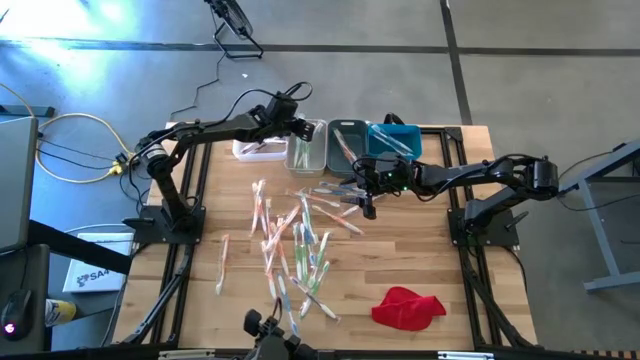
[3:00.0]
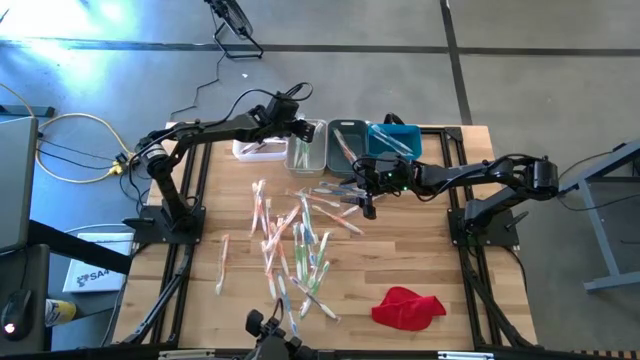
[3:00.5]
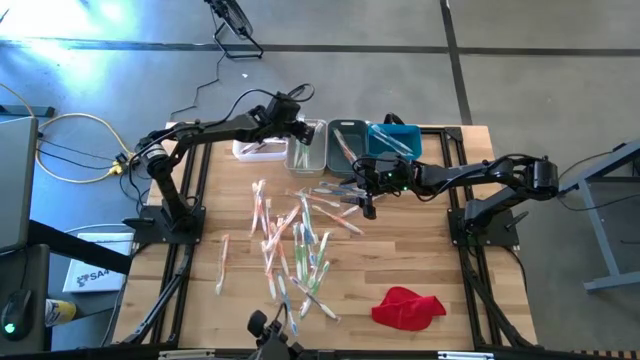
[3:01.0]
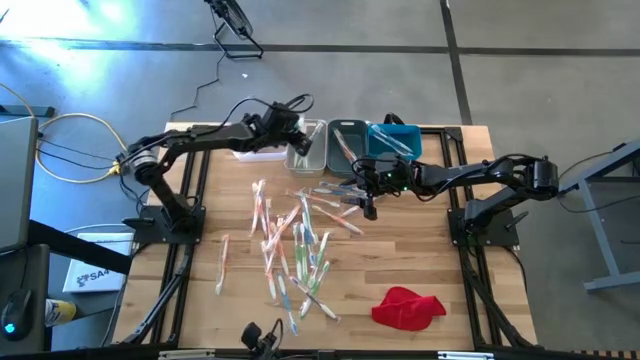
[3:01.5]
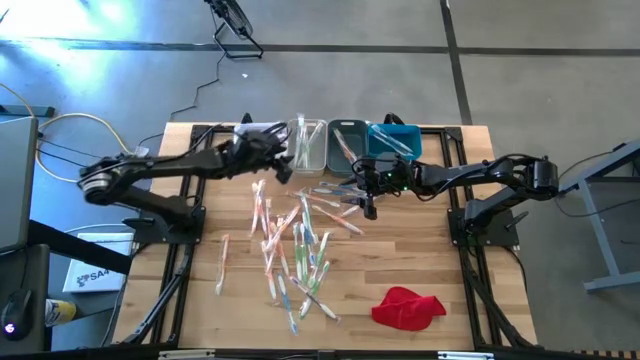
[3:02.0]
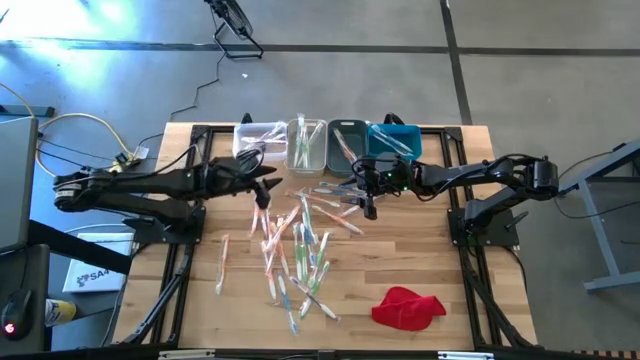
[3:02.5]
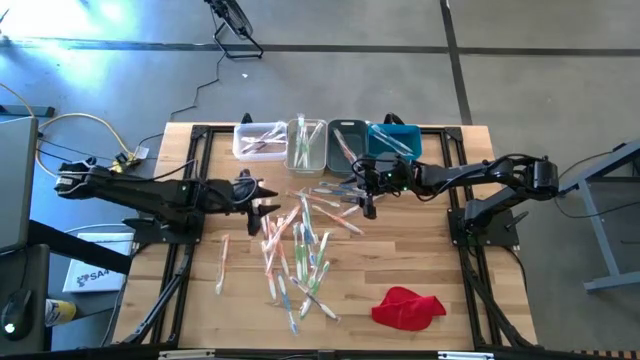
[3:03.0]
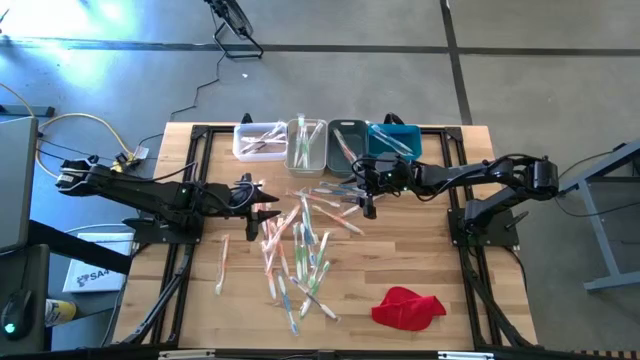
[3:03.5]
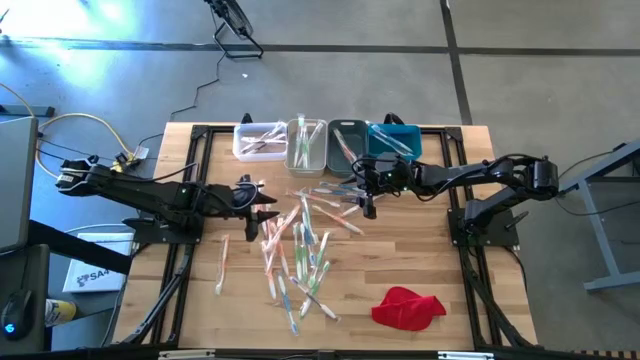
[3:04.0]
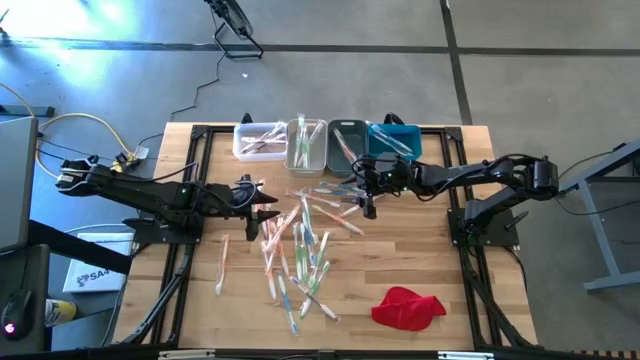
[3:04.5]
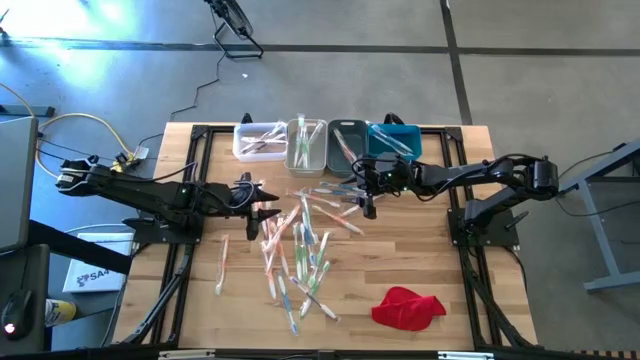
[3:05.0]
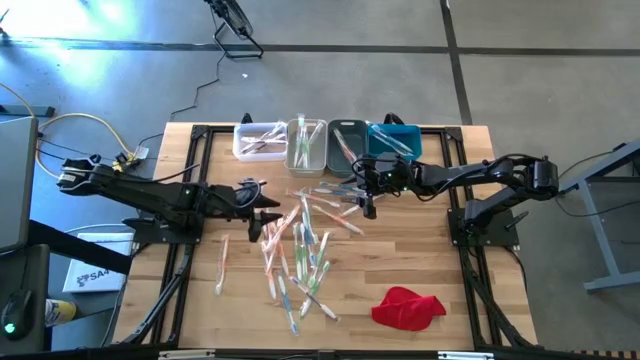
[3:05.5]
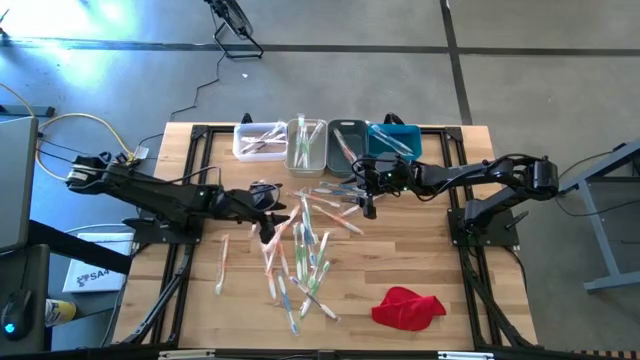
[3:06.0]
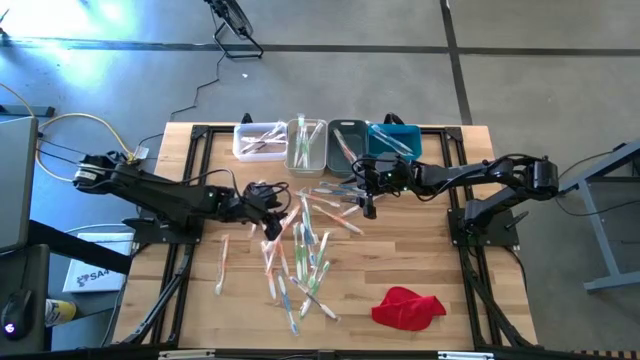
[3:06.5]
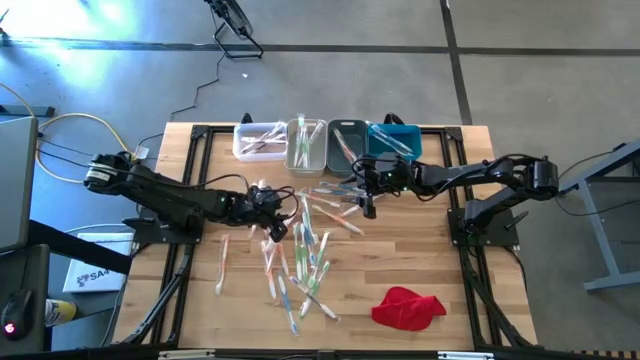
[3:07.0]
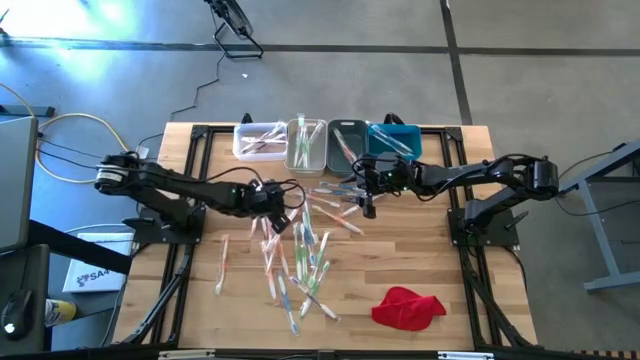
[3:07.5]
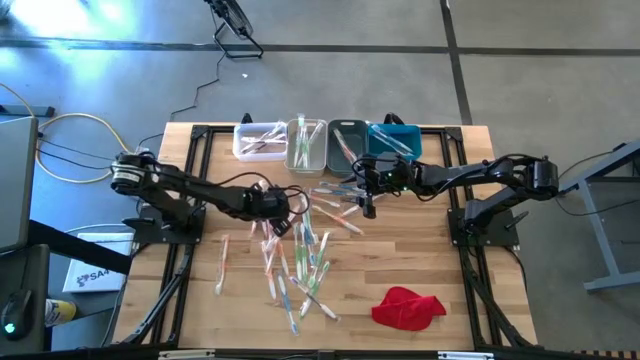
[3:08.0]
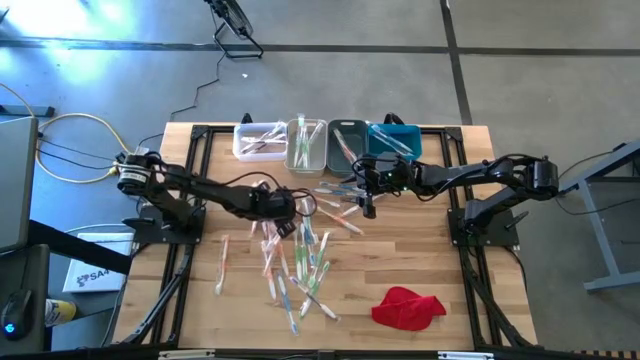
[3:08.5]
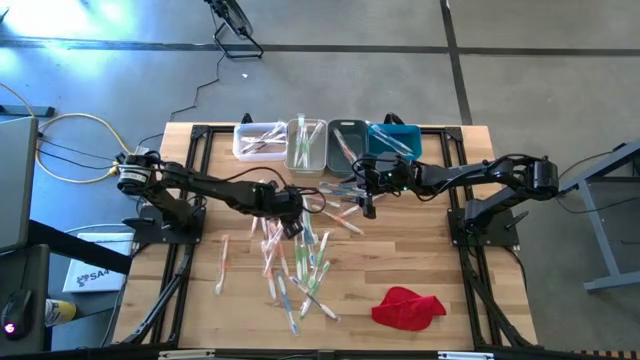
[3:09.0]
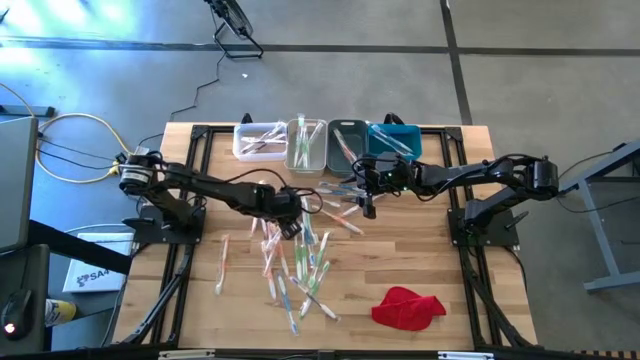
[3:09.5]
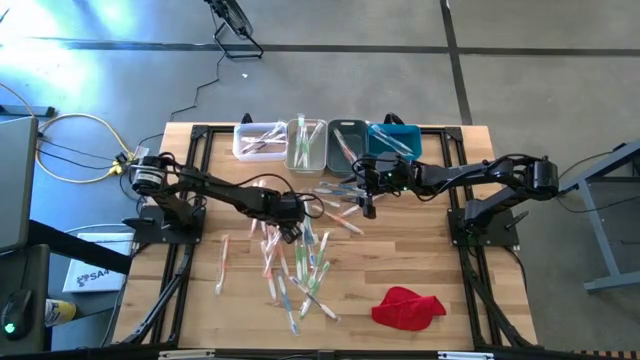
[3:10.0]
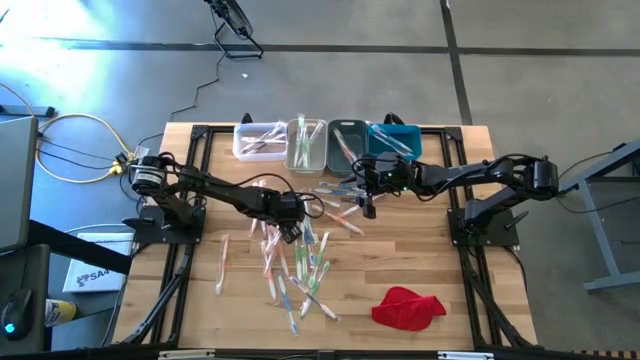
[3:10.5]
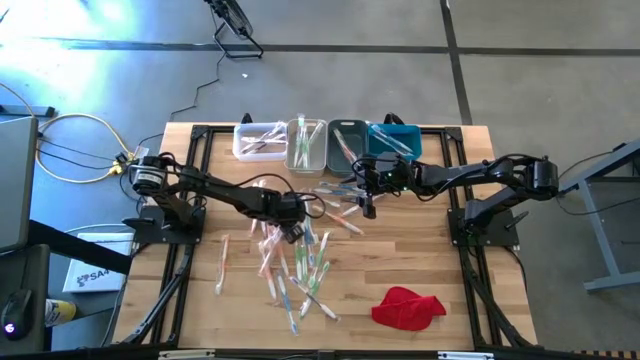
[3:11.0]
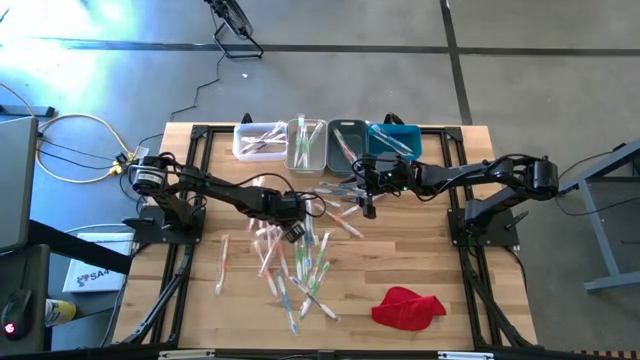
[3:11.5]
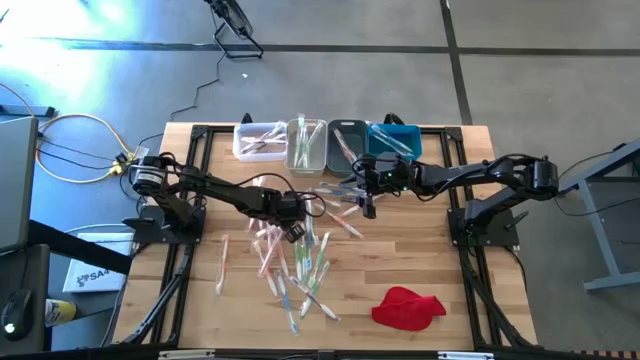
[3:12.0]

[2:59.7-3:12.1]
Task: Pick & Place Toothbrushes
Put the orange toothbrush into the dark green bin

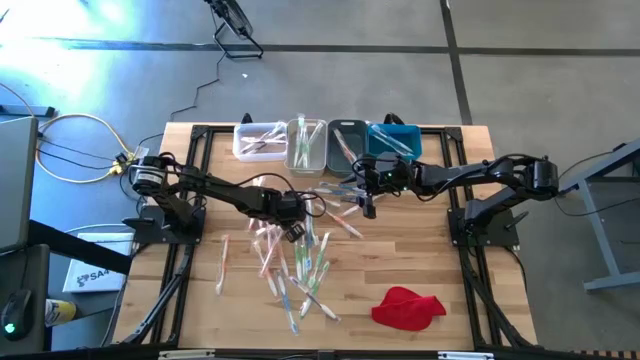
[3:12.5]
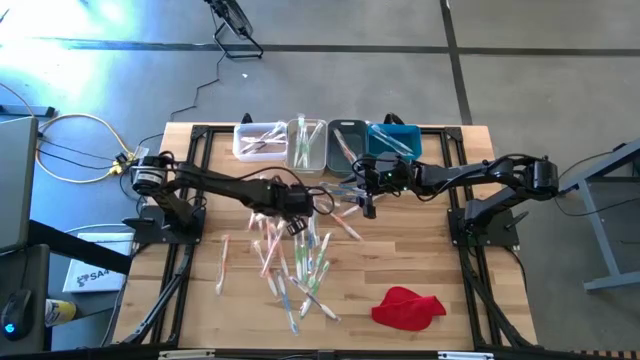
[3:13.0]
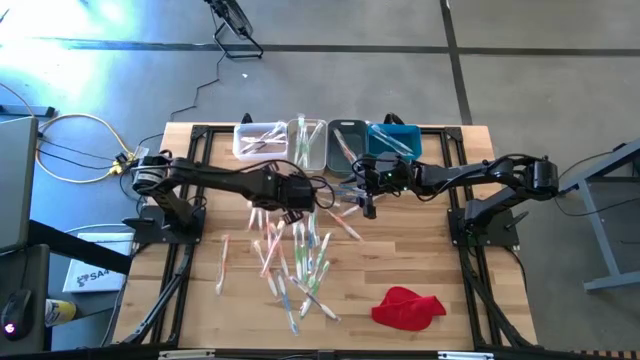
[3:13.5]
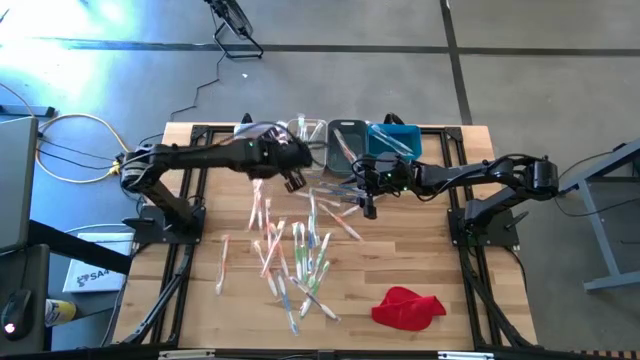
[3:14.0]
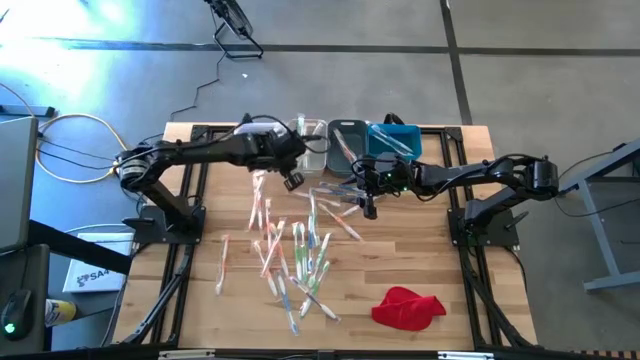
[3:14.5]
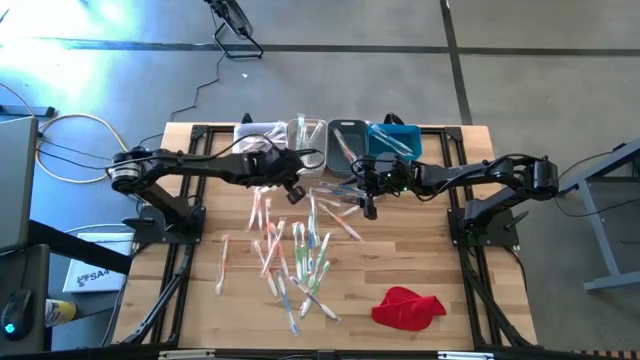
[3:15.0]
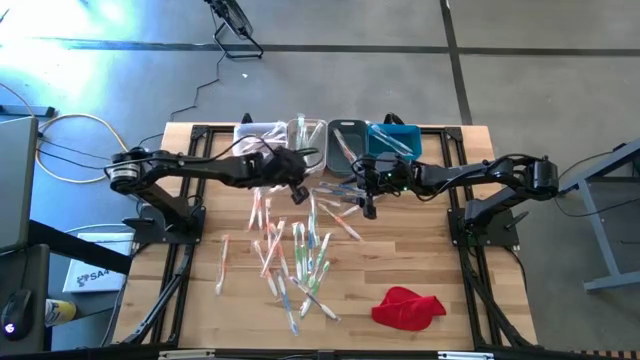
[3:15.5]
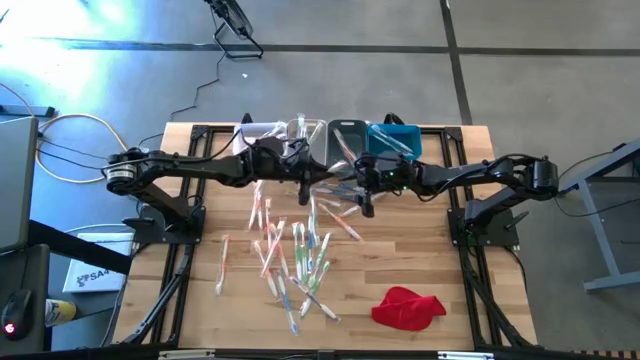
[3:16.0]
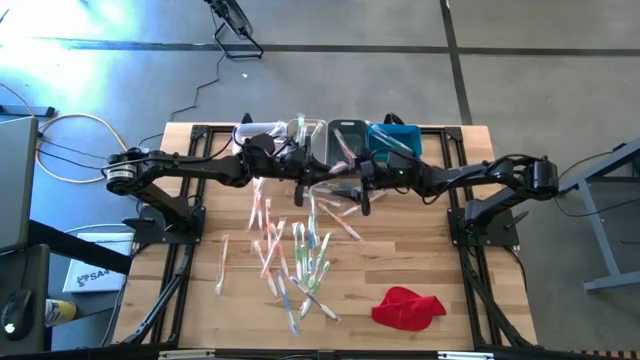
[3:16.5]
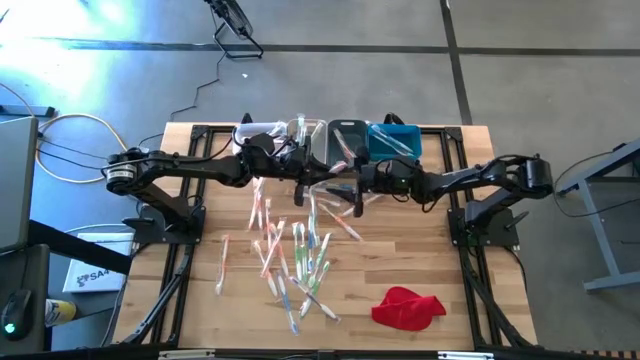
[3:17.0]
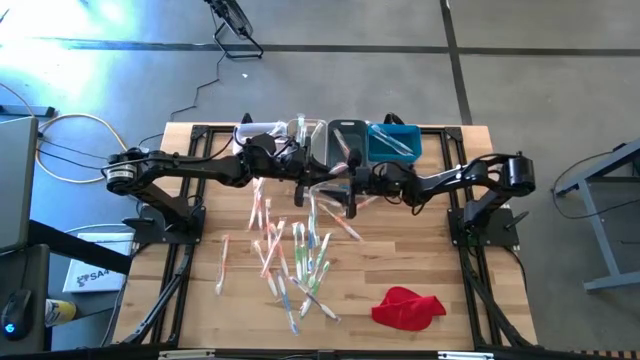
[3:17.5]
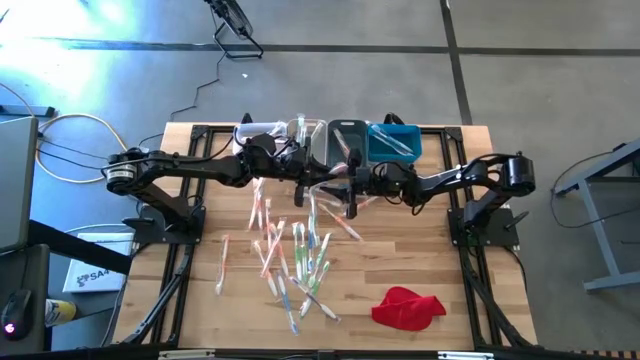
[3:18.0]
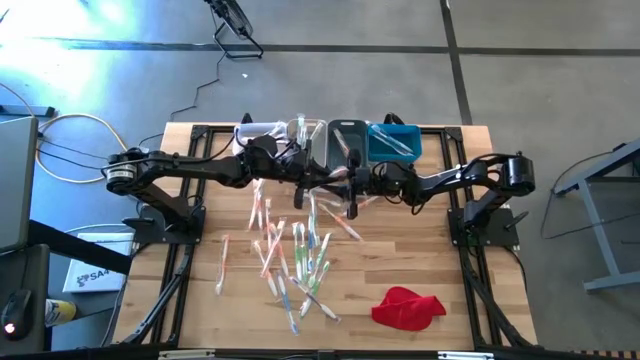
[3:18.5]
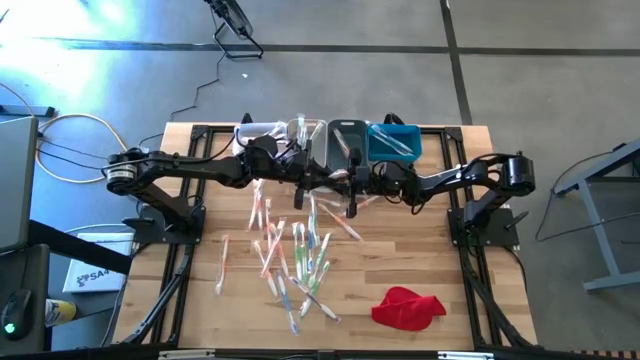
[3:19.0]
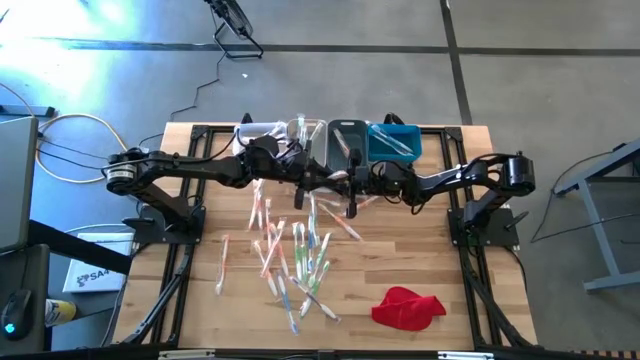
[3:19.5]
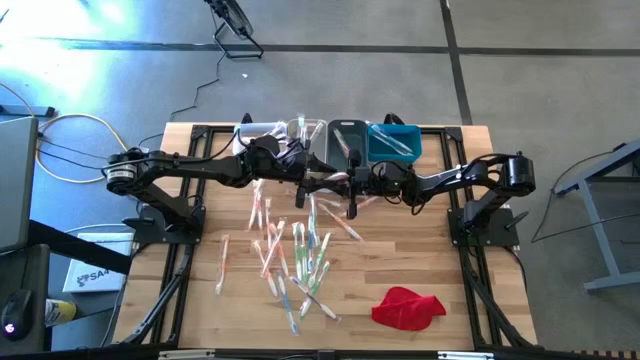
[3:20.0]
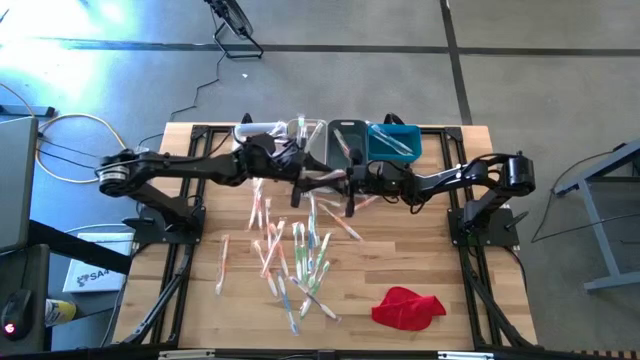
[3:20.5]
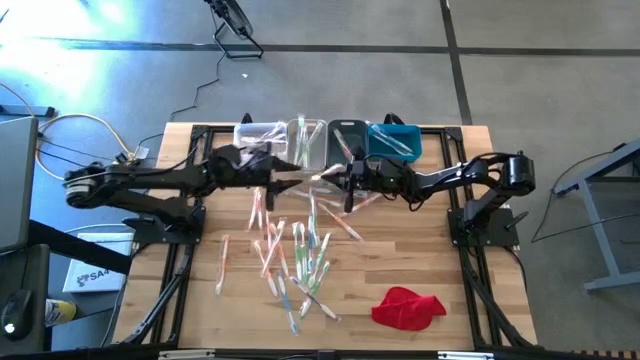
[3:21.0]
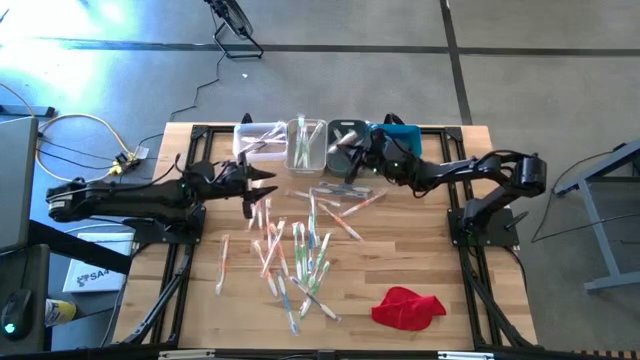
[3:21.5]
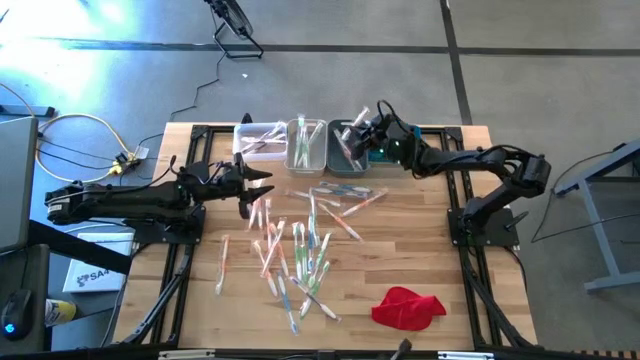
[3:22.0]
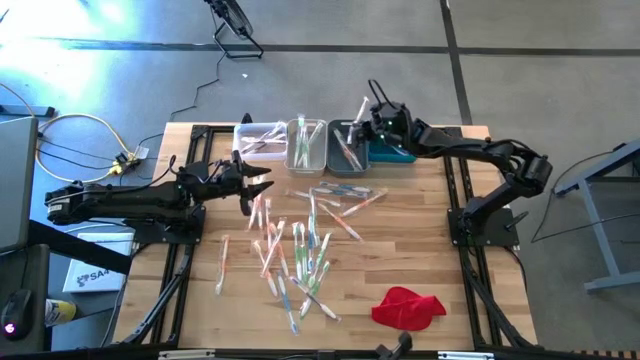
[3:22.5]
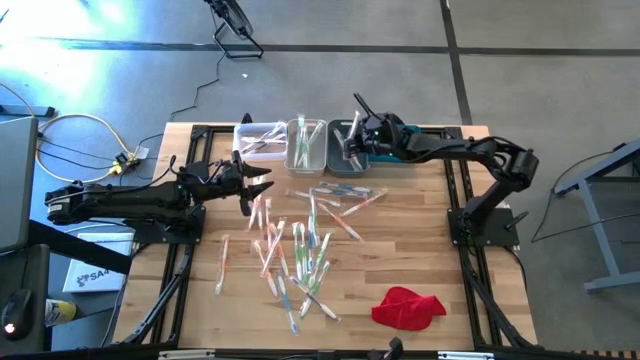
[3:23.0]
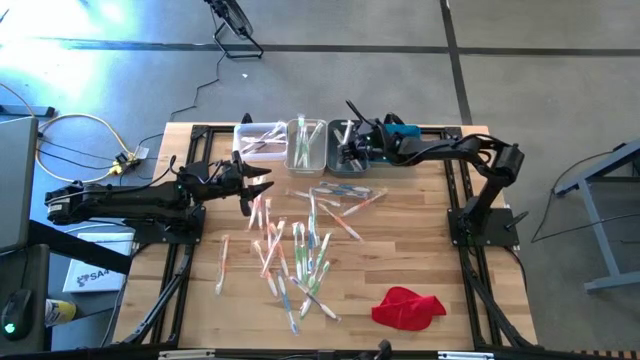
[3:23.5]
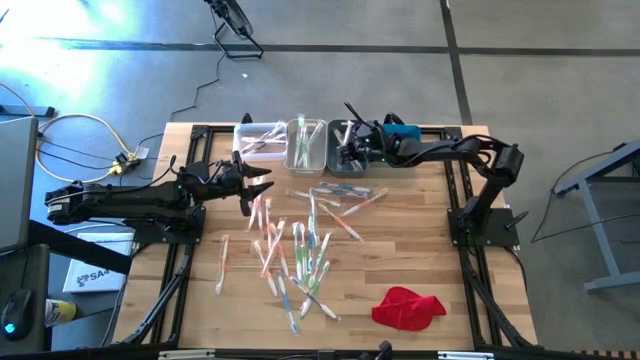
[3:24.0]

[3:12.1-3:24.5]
Put the orange toothbrush into the dark green bin
